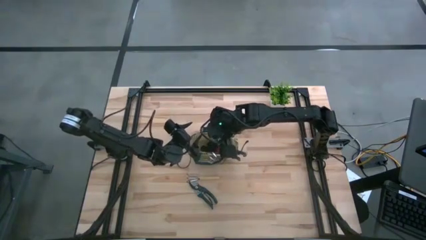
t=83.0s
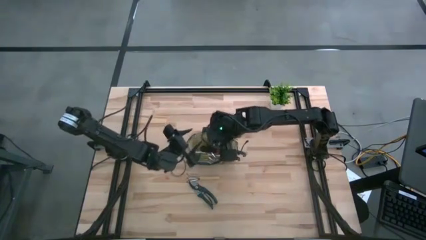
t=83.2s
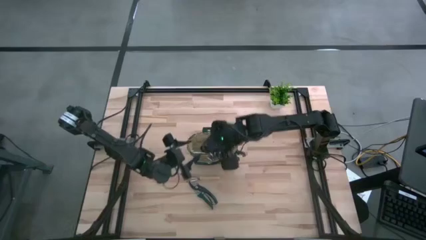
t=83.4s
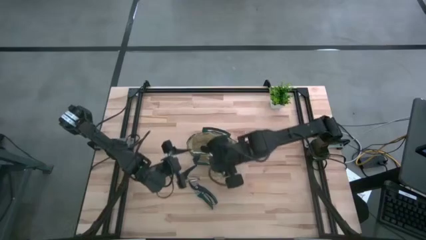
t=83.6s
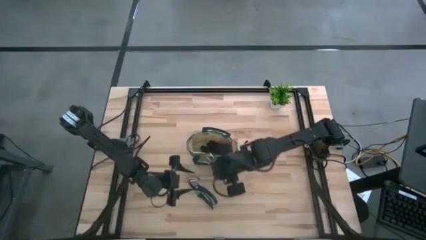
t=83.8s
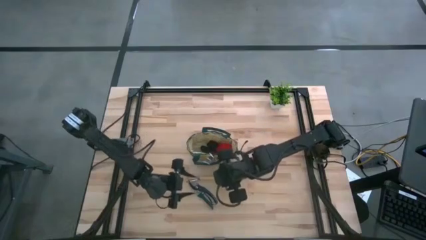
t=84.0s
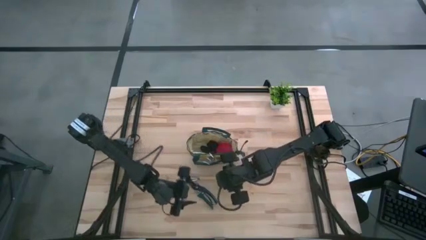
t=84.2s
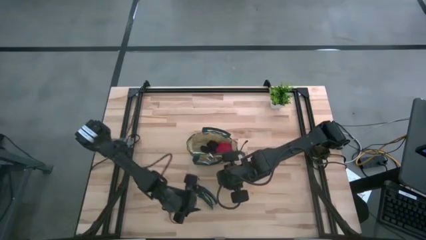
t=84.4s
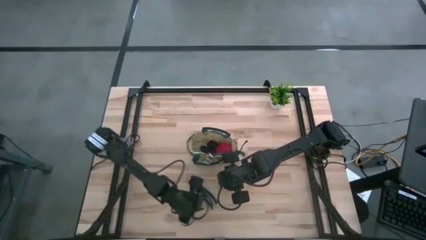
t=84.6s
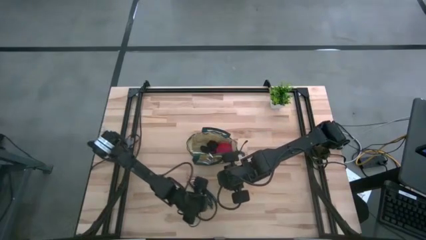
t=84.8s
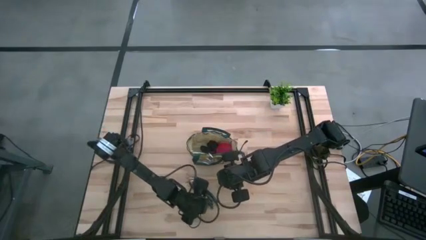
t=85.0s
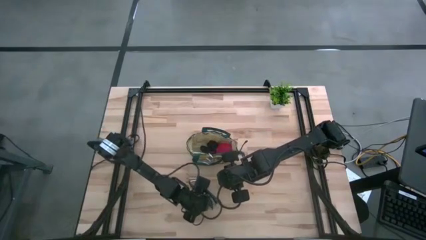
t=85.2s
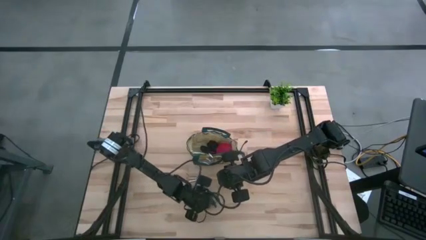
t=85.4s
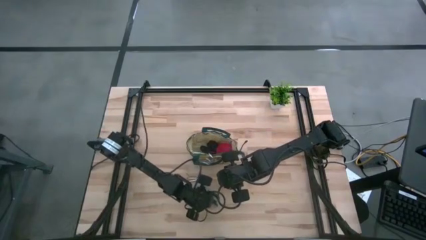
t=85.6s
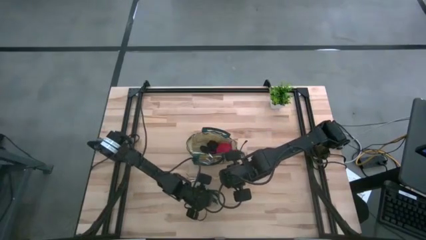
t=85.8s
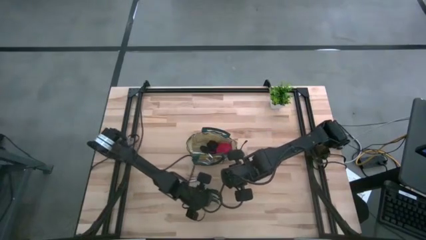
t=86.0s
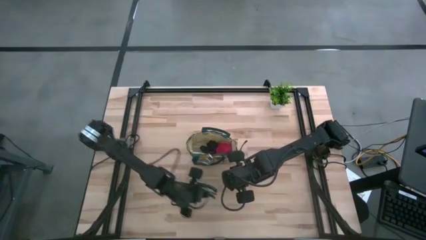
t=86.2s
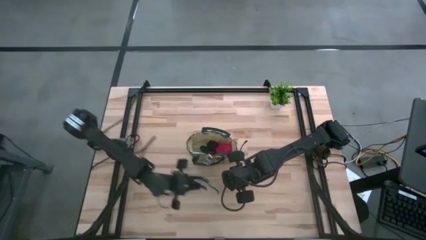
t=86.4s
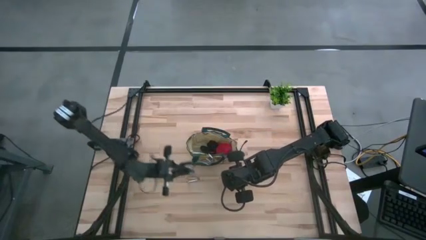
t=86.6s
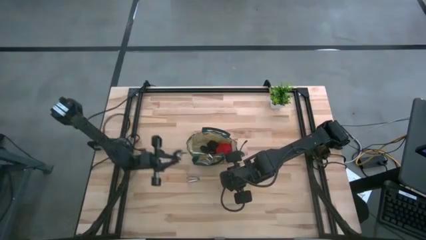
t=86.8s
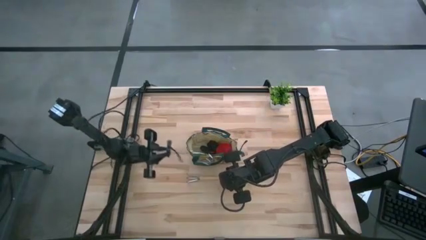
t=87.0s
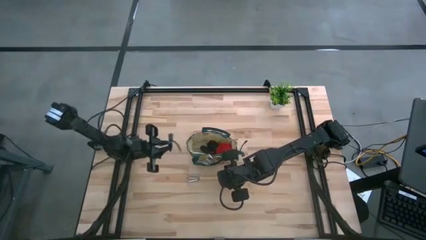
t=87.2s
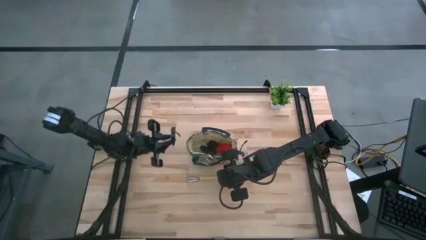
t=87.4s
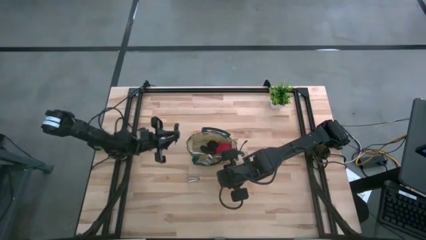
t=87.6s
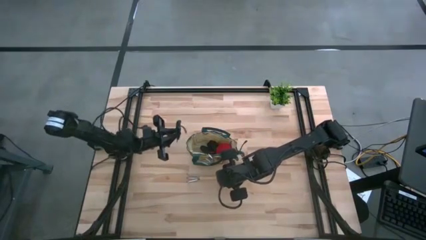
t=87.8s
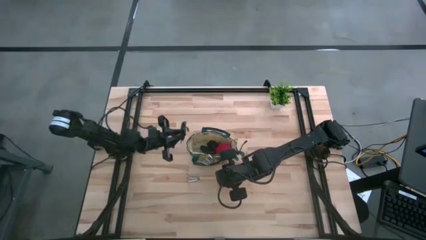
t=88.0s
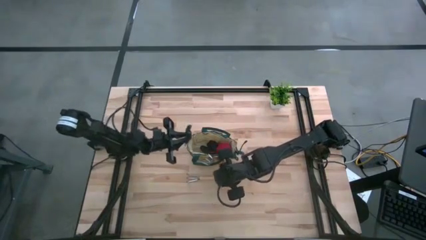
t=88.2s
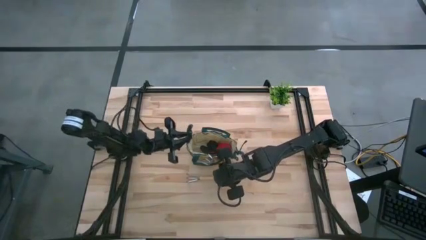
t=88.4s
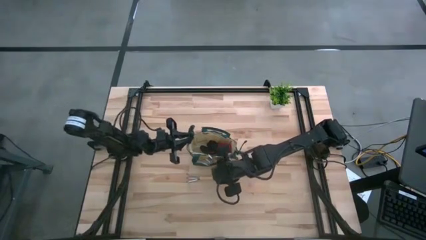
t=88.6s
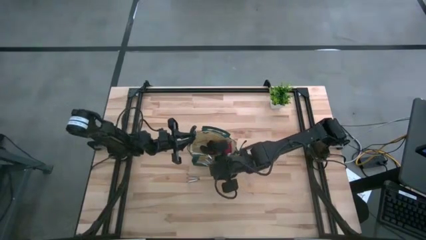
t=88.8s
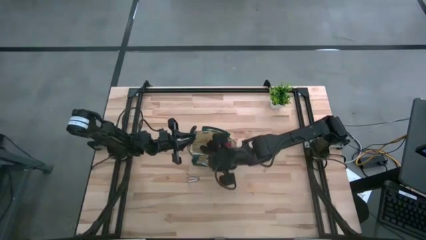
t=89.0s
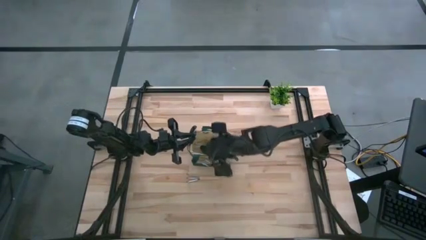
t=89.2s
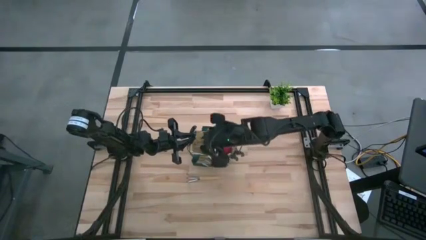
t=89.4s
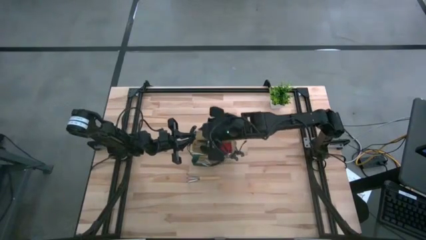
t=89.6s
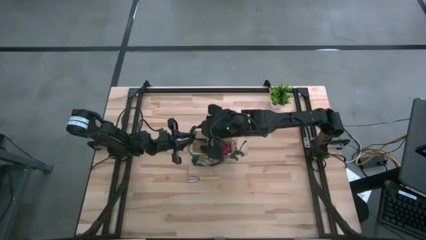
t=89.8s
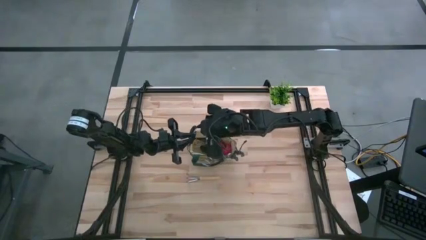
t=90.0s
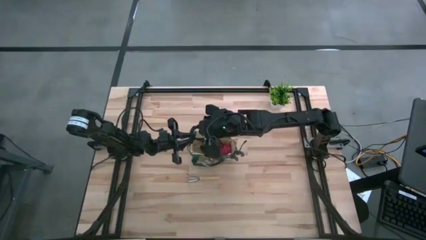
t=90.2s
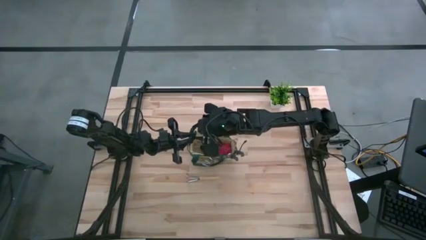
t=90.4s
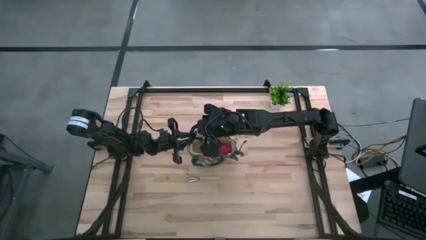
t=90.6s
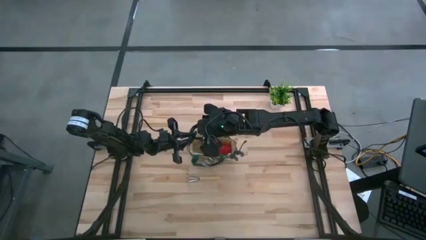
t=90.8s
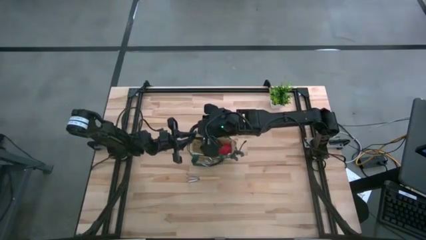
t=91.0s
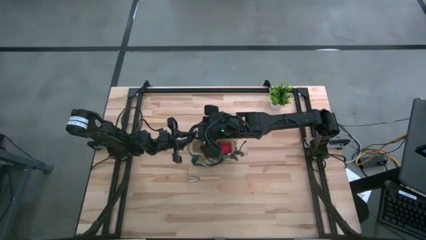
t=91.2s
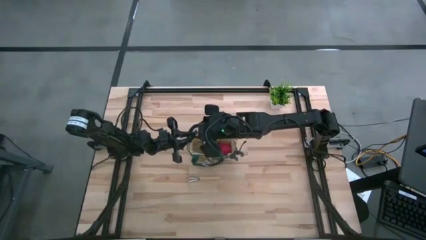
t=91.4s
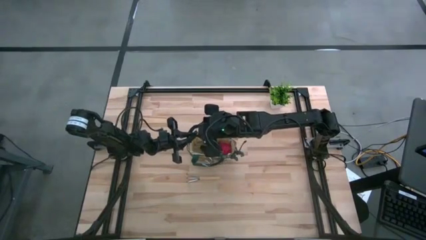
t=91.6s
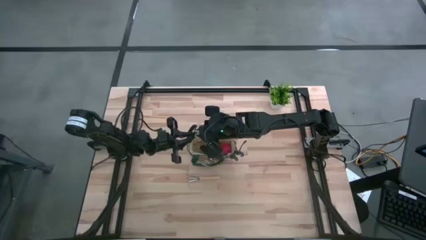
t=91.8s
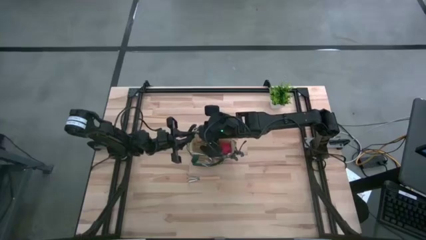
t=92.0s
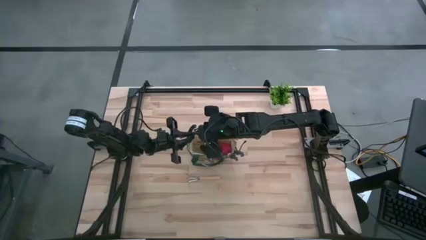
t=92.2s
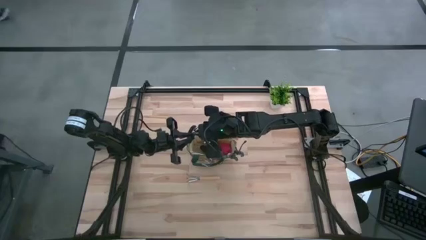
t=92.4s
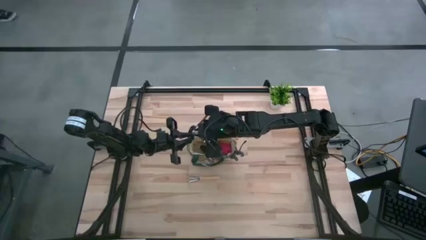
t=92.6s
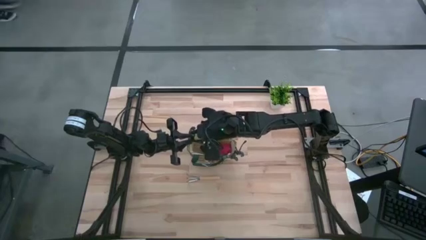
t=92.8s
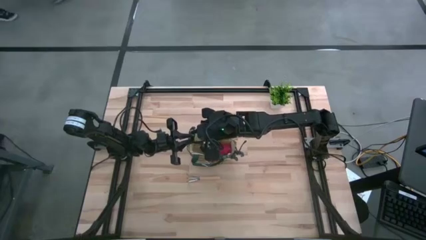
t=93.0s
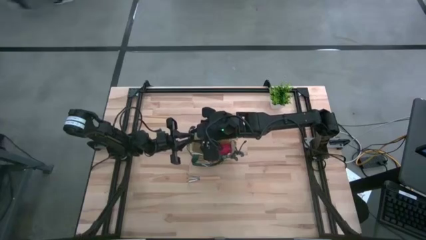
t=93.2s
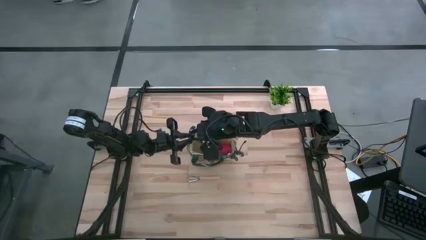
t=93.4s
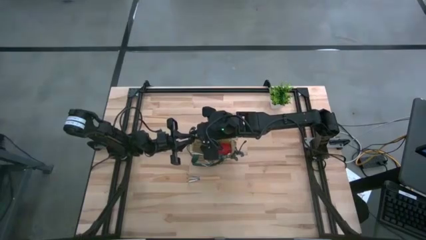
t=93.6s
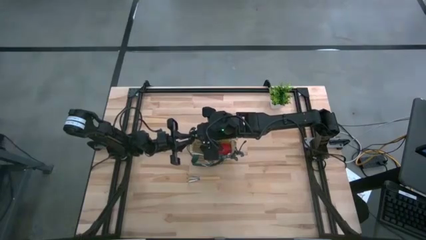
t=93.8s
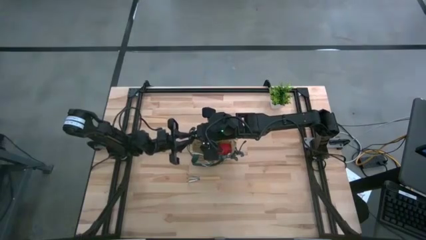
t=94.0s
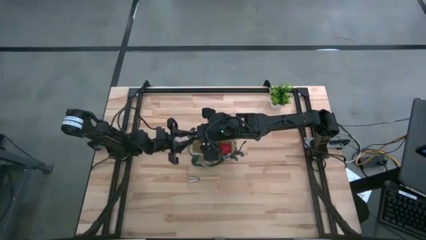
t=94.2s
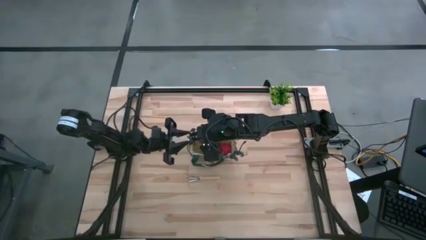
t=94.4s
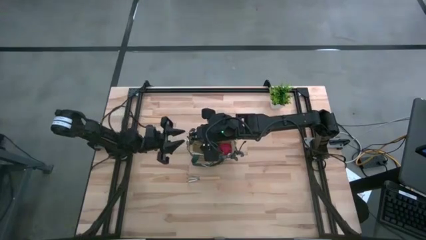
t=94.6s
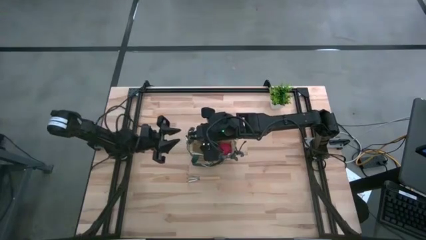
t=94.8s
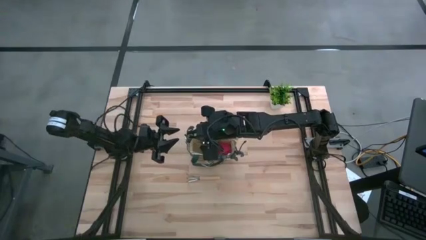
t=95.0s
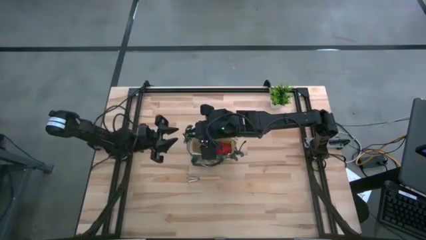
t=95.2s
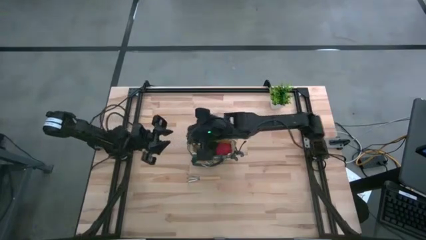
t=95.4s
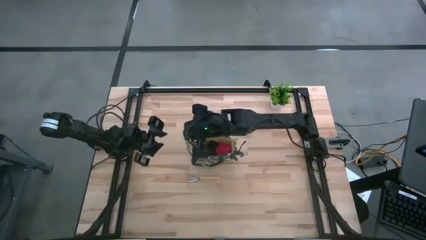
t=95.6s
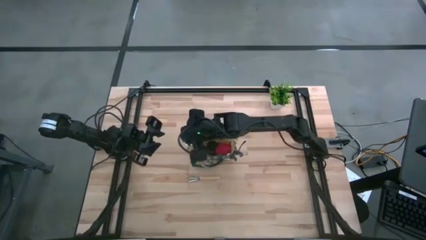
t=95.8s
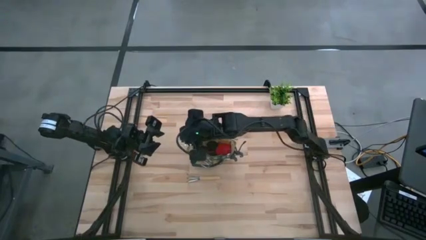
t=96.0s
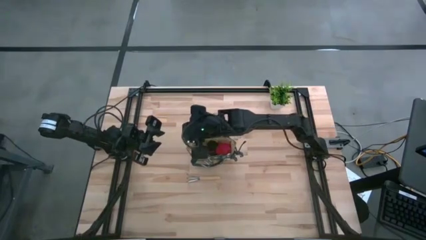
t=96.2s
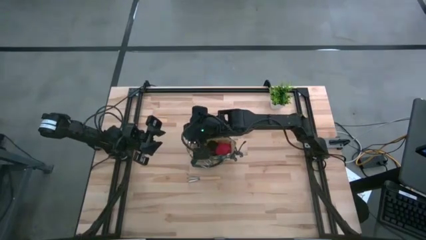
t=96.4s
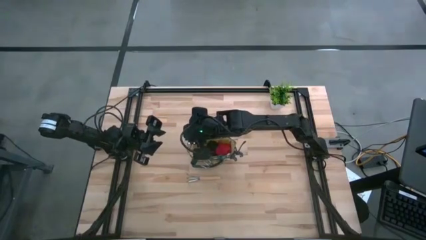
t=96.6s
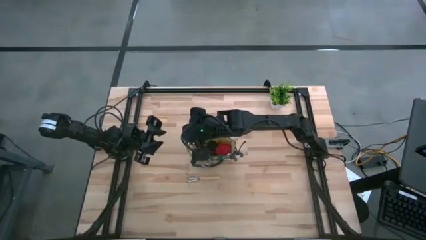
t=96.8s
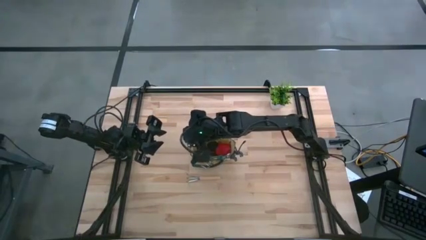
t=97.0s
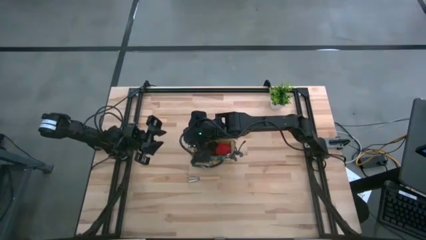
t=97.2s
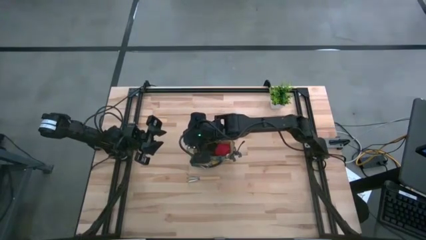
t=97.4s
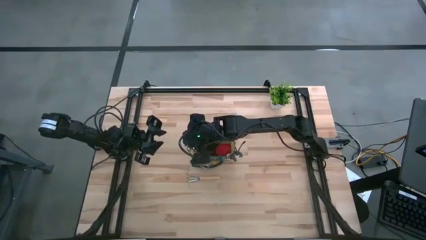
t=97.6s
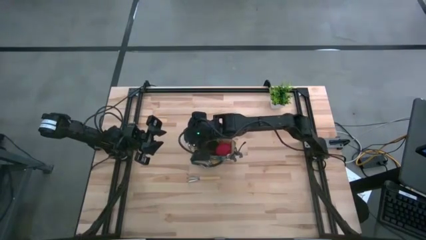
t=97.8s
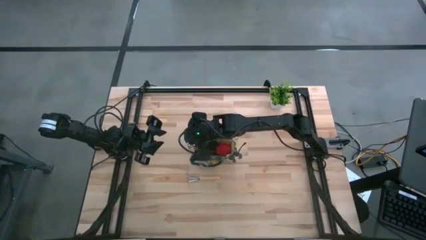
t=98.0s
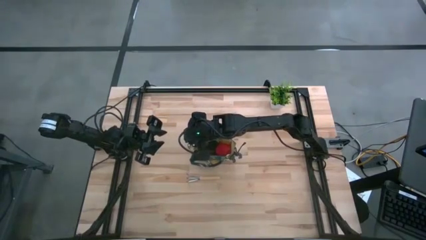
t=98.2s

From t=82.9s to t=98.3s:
Task: Pick & Place Garden tools in Gardening bag
Put the green shear scissors into the brown gardening bag
